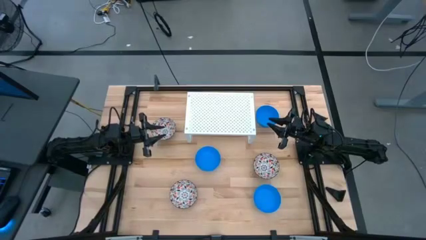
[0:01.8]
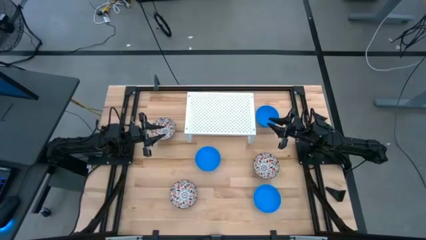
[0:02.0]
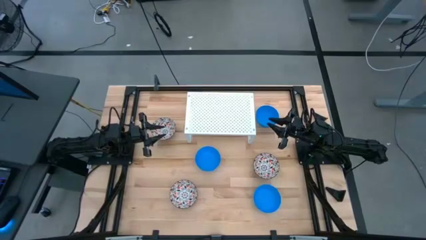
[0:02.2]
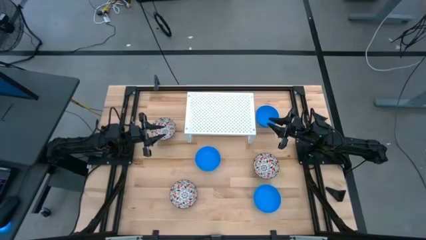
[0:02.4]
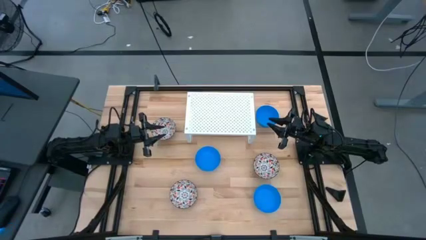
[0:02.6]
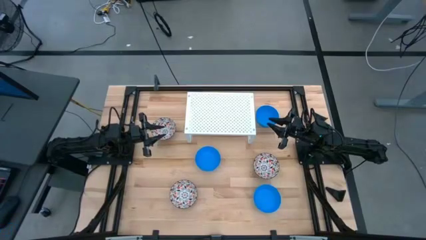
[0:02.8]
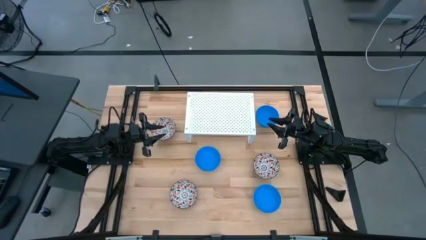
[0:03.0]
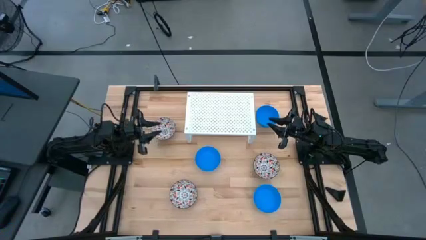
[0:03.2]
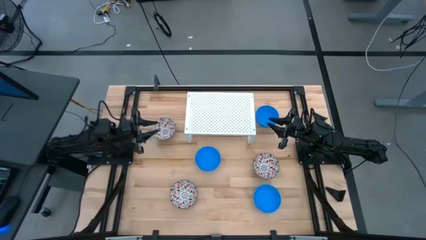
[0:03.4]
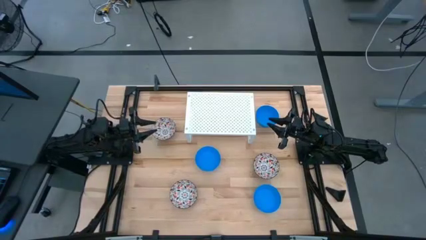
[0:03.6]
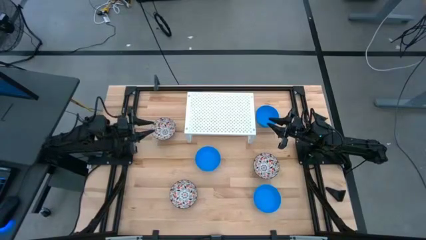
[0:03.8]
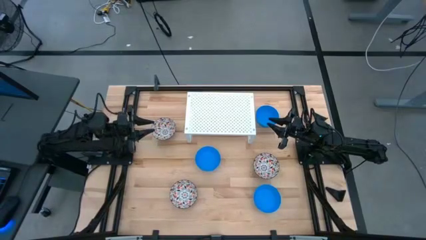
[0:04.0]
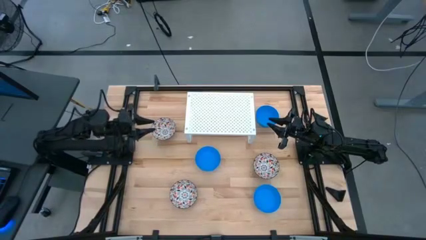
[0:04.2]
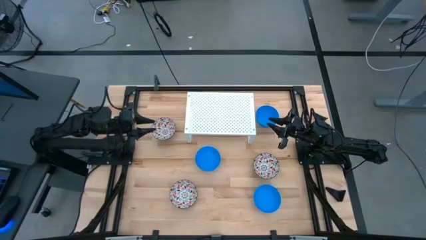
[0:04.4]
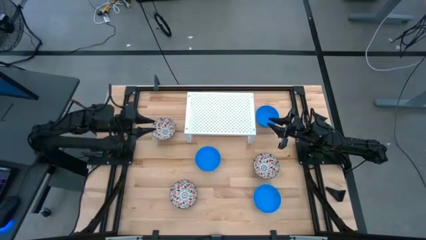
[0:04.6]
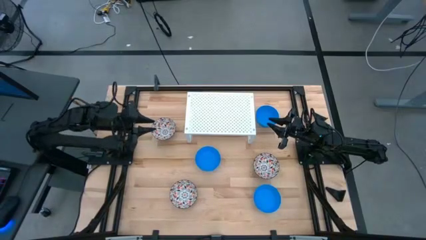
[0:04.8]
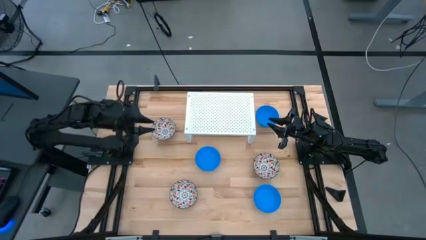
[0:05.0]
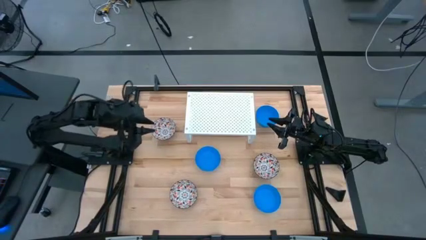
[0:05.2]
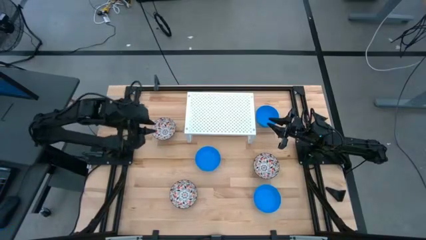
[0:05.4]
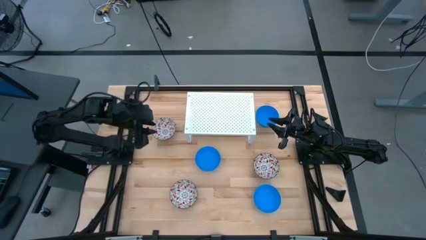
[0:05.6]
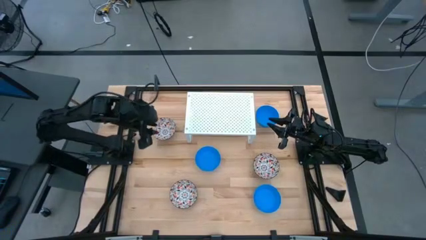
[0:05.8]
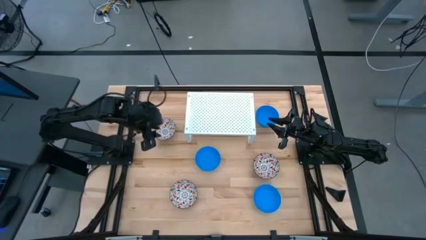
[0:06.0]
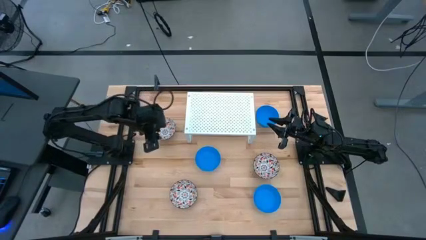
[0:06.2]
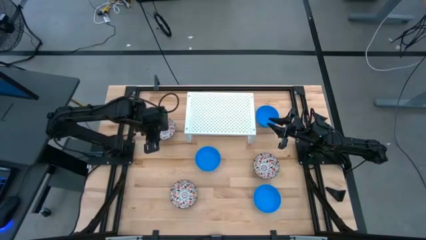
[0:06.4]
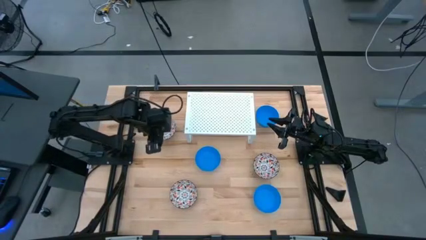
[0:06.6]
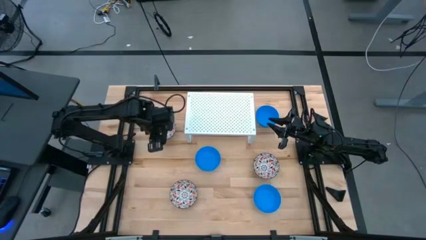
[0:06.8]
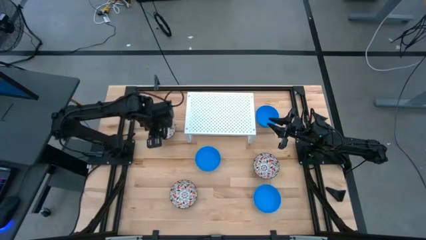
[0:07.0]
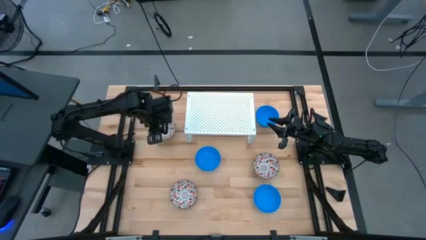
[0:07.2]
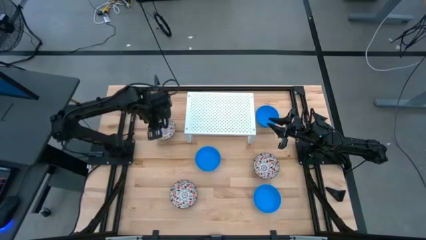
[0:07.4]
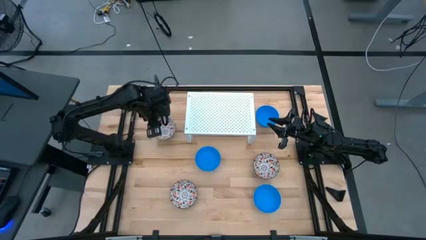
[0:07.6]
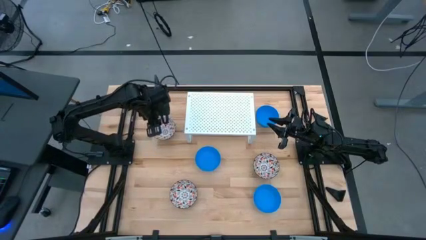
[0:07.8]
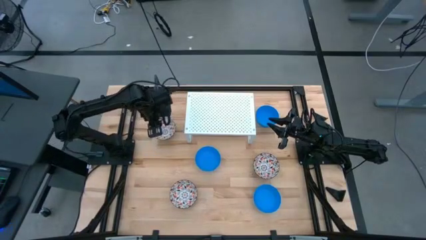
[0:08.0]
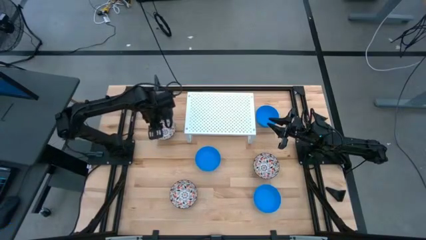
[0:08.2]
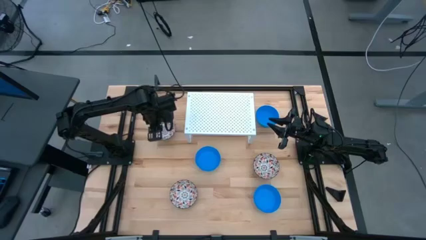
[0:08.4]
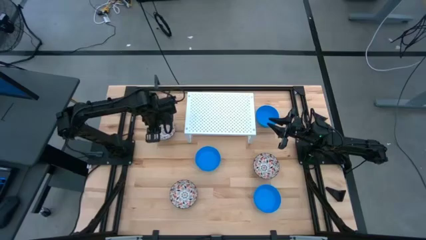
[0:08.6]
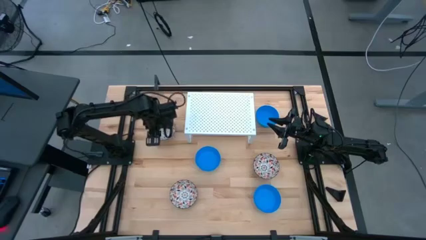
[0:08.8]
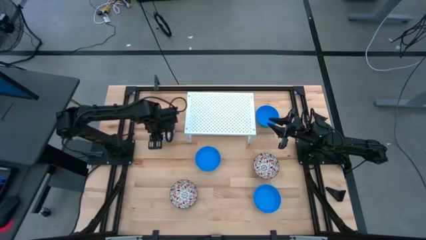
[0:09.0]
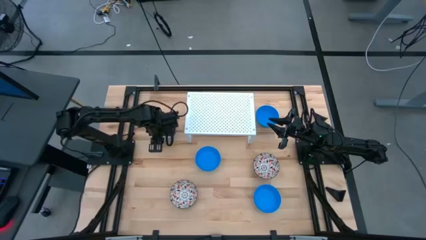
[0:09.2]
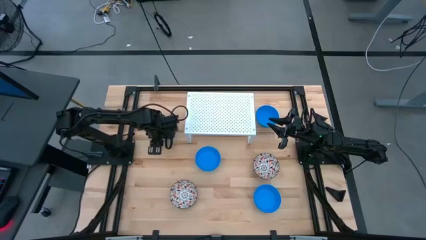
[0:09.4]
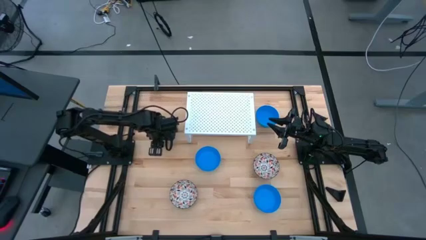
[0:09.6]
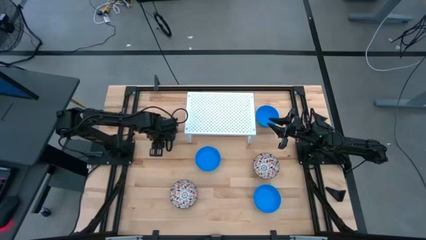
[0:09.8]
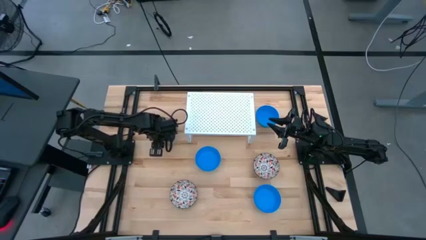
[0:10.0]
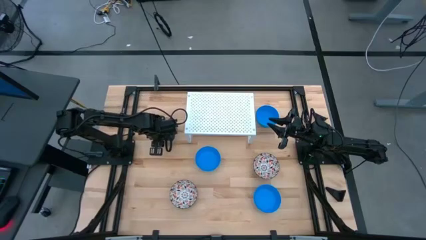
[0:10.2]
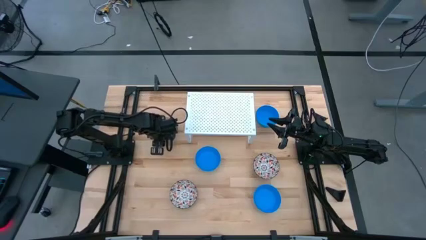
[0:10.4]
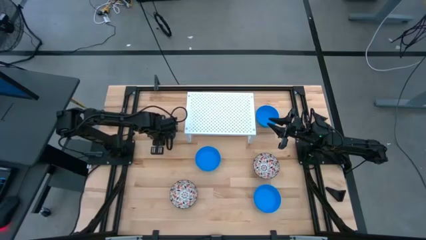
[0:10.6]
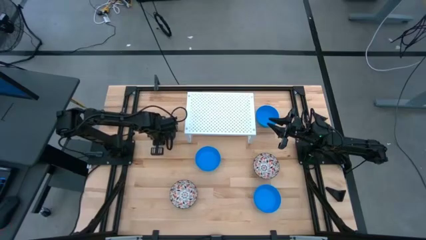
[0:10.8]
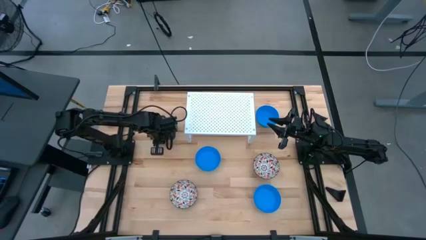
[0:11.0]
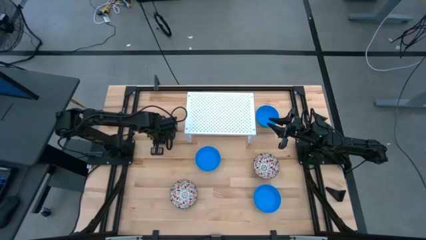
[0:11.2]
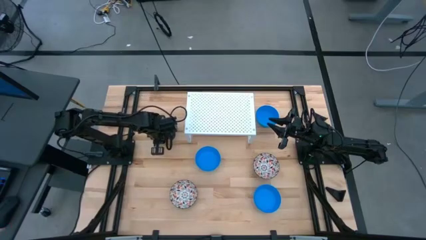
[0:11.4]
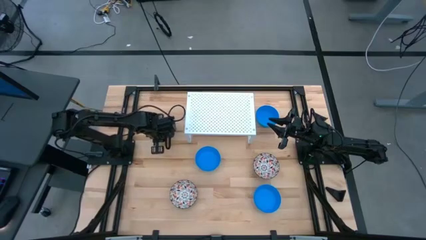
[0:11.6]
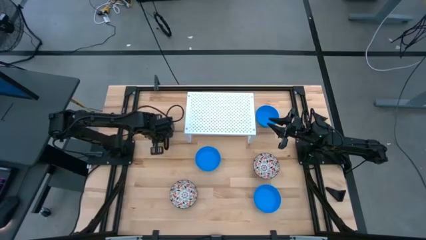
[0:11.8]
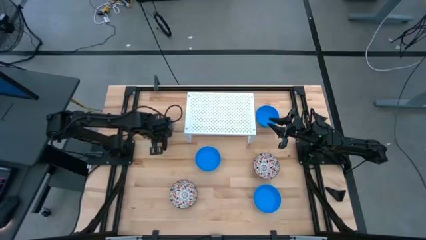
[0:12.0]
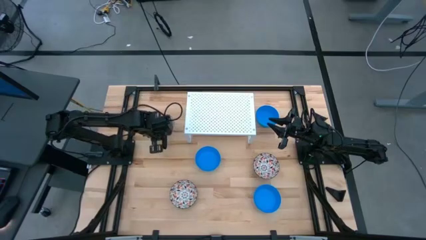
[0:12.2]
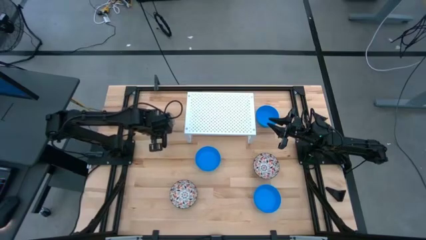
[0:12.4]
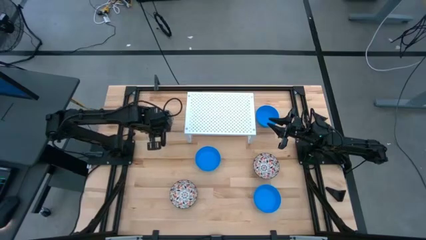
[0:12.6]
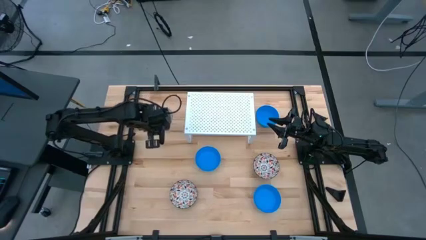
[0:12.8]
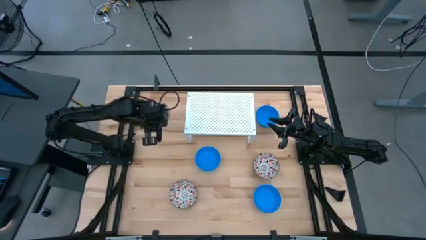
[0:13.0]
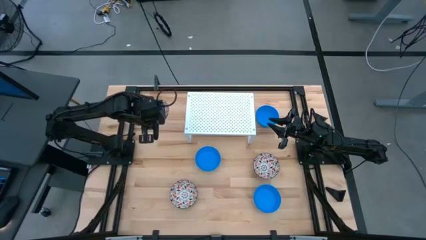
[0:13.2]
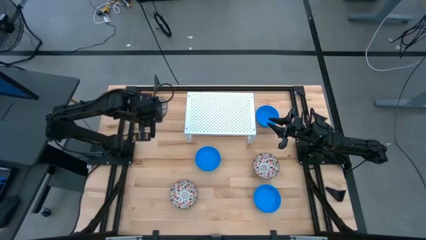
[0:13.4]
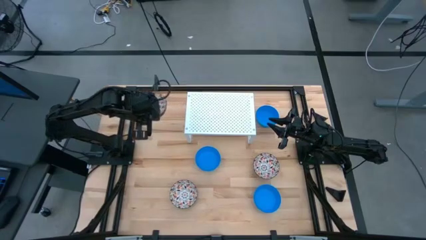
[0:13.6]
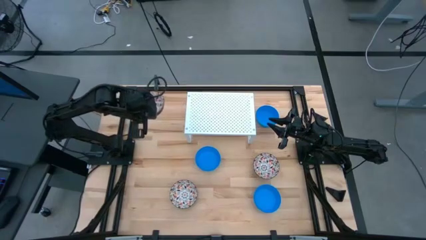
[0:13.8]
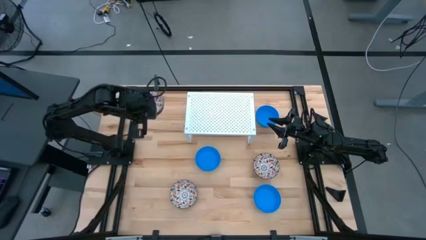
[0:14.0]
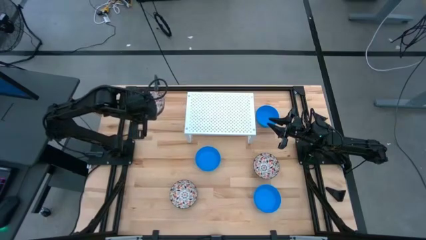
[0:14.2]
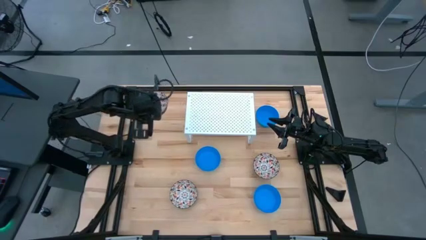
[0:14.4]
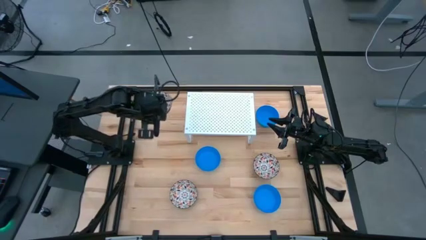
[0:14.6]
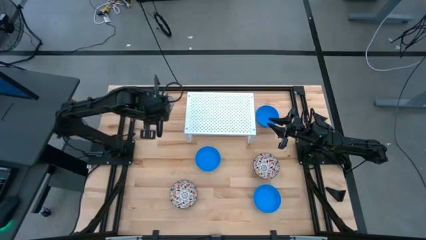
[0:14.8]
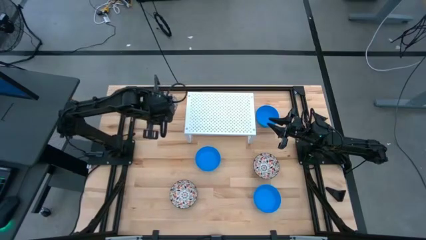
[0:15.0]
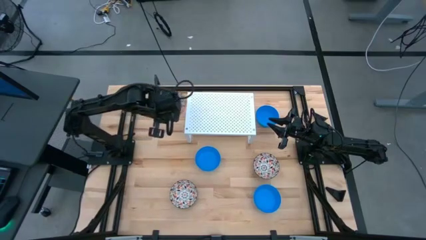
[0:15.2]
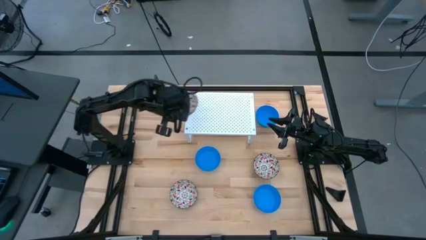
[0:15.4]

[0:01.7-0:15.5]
Task: Pick & Place Mini bowls
Put the top left white patterned bowl on the shelf
